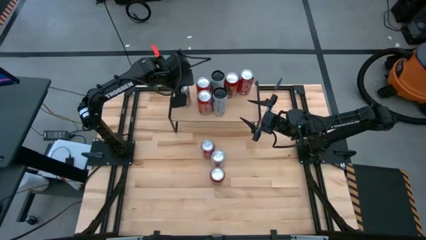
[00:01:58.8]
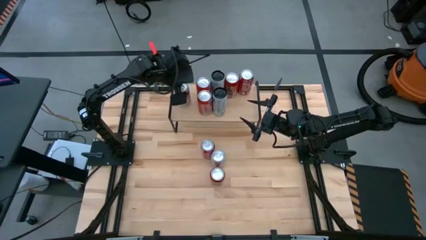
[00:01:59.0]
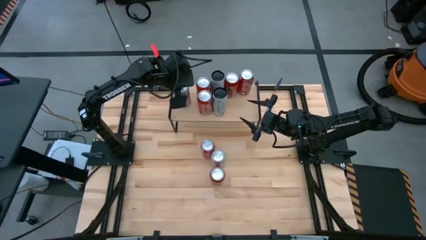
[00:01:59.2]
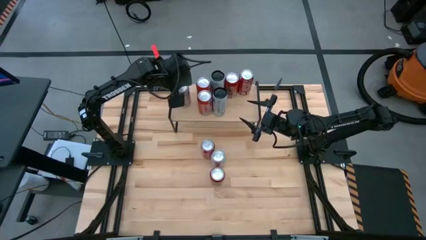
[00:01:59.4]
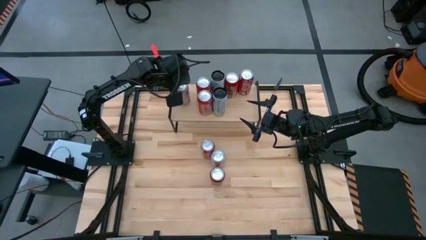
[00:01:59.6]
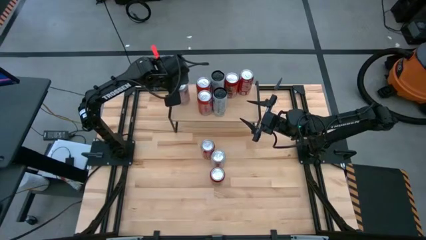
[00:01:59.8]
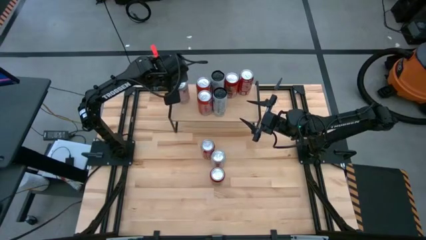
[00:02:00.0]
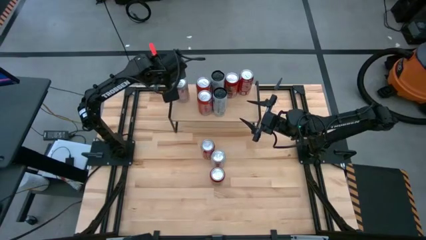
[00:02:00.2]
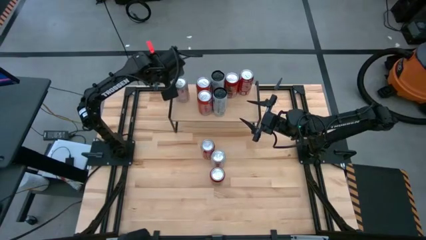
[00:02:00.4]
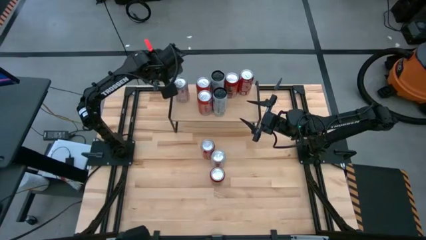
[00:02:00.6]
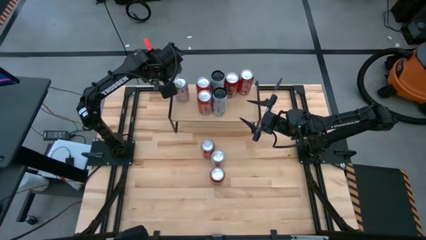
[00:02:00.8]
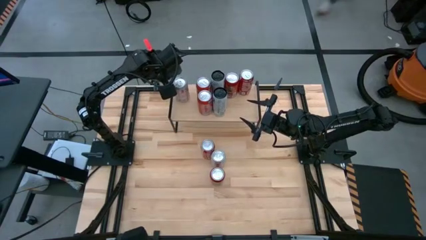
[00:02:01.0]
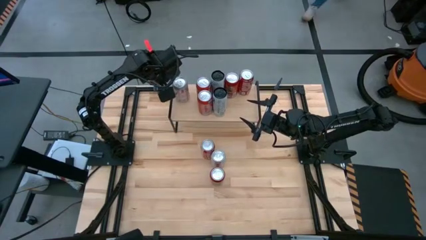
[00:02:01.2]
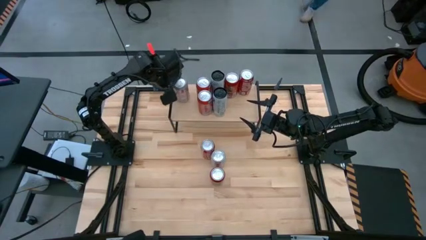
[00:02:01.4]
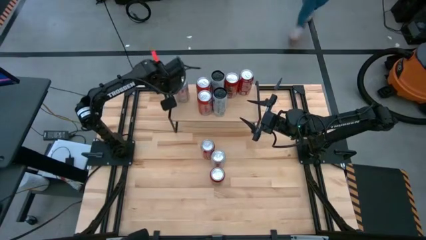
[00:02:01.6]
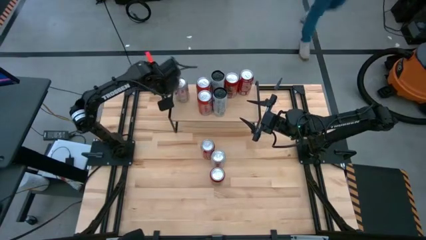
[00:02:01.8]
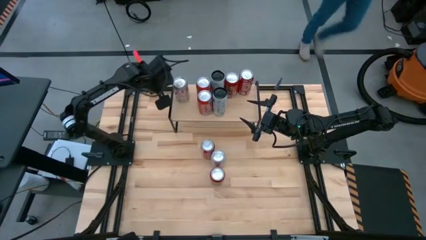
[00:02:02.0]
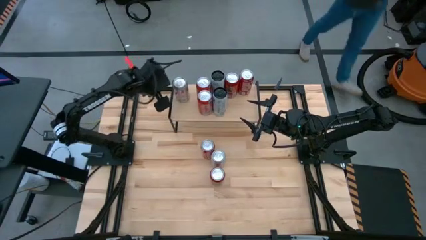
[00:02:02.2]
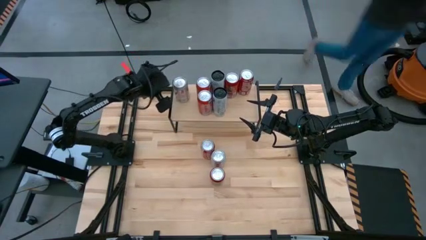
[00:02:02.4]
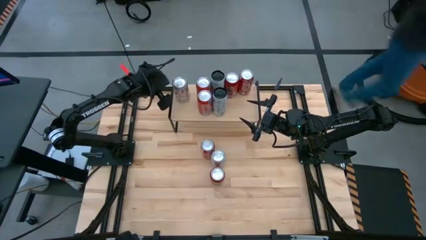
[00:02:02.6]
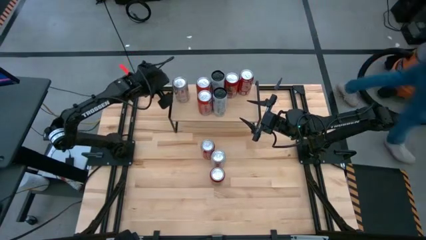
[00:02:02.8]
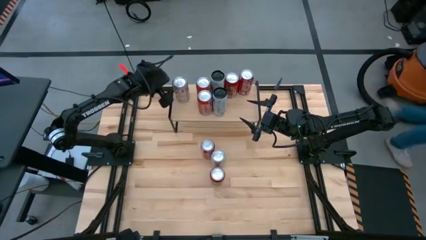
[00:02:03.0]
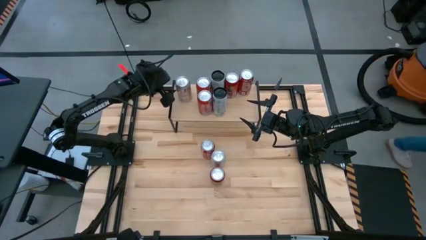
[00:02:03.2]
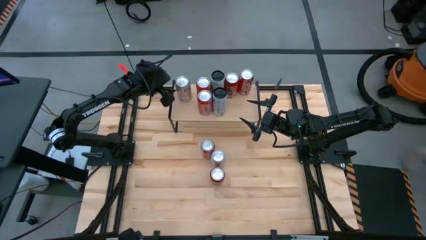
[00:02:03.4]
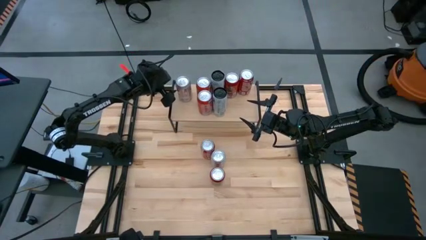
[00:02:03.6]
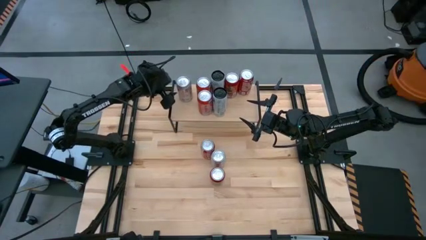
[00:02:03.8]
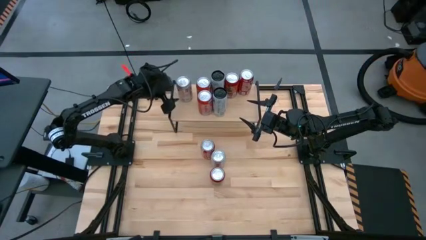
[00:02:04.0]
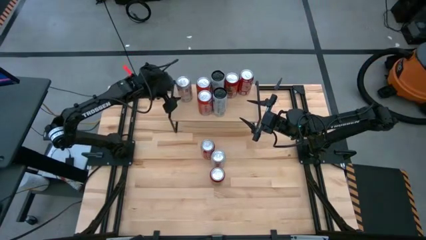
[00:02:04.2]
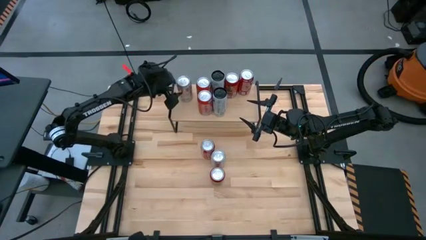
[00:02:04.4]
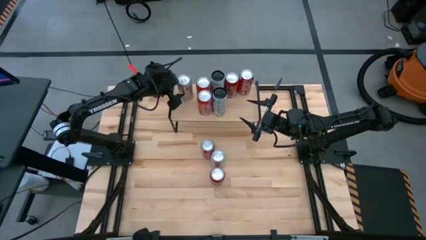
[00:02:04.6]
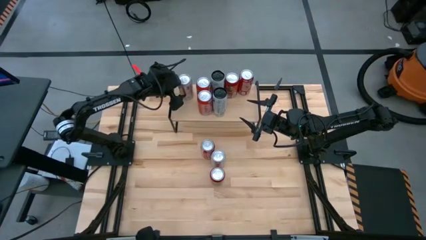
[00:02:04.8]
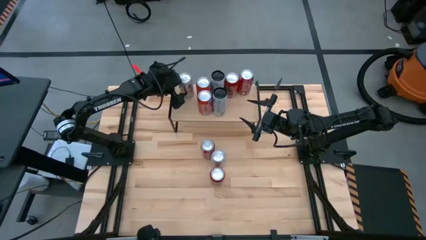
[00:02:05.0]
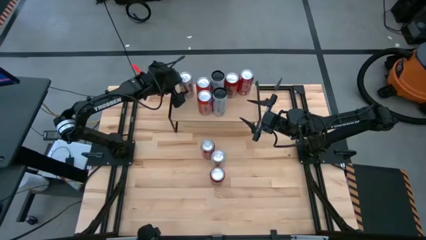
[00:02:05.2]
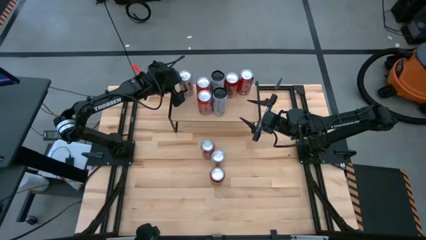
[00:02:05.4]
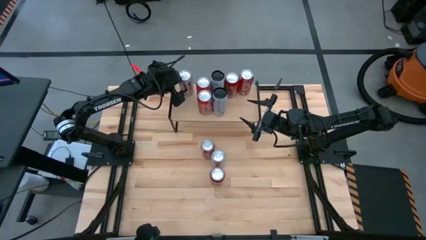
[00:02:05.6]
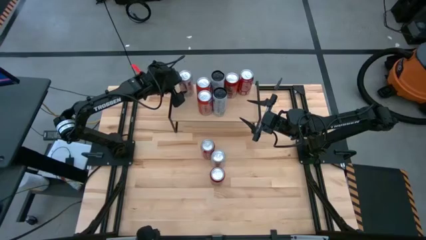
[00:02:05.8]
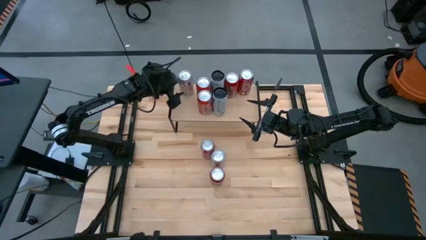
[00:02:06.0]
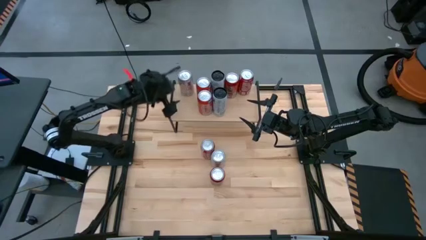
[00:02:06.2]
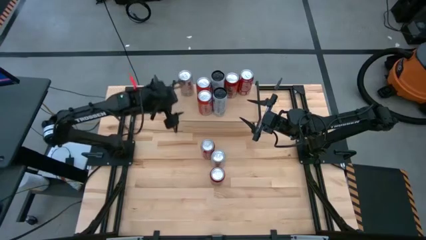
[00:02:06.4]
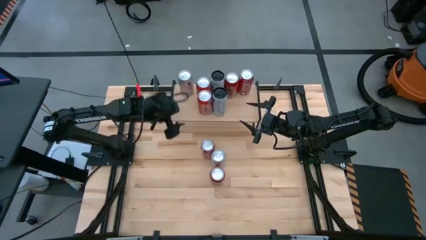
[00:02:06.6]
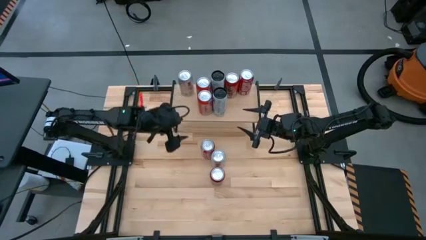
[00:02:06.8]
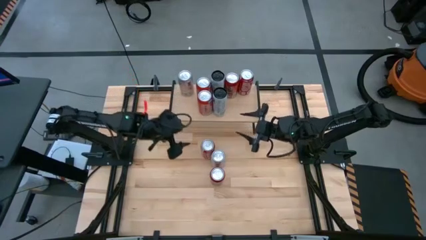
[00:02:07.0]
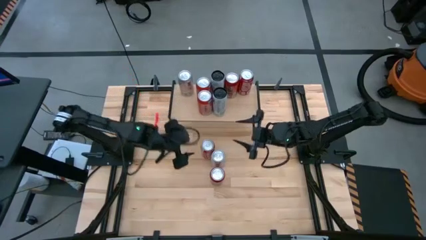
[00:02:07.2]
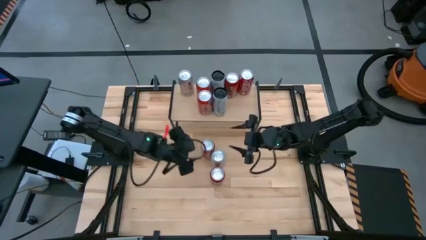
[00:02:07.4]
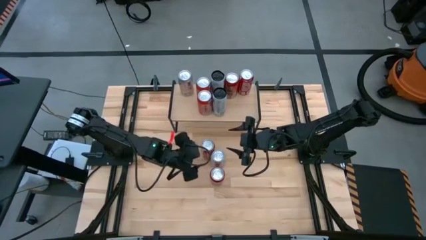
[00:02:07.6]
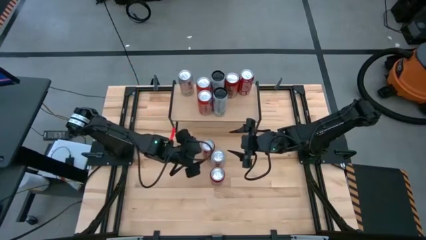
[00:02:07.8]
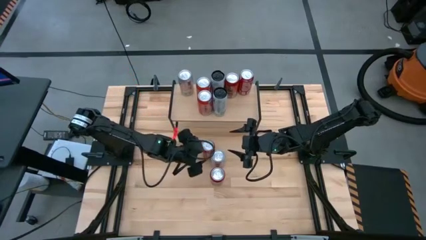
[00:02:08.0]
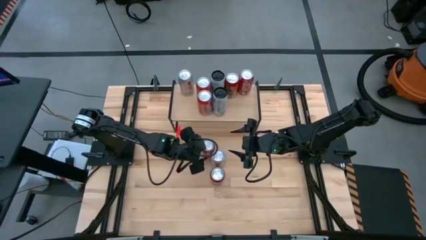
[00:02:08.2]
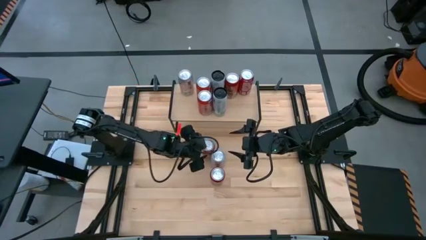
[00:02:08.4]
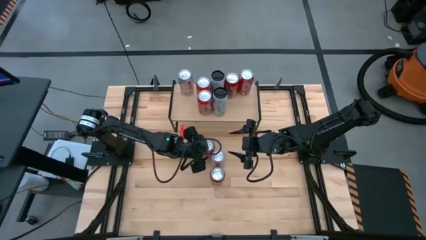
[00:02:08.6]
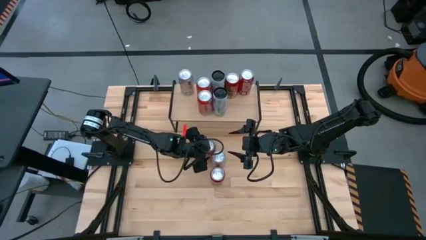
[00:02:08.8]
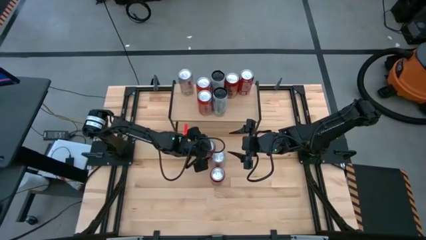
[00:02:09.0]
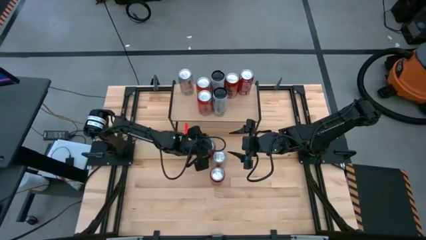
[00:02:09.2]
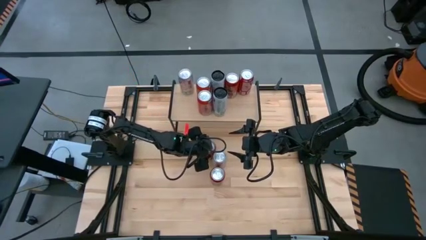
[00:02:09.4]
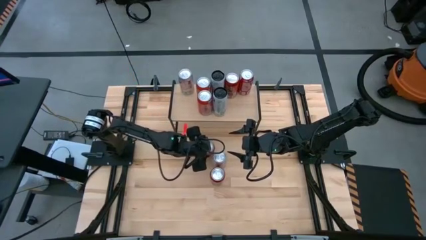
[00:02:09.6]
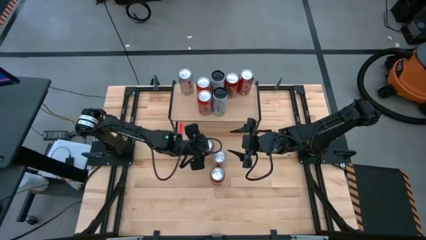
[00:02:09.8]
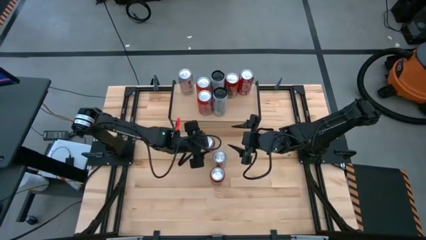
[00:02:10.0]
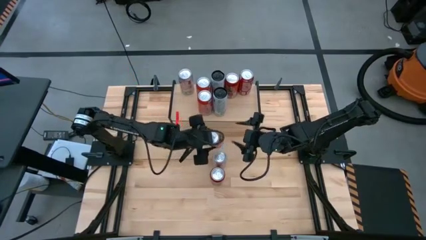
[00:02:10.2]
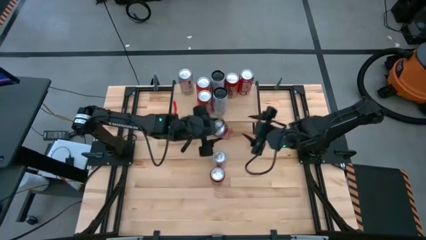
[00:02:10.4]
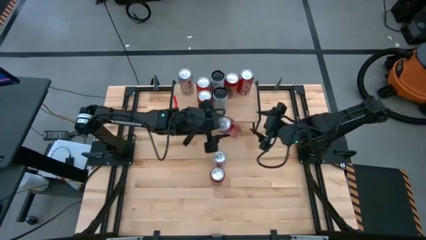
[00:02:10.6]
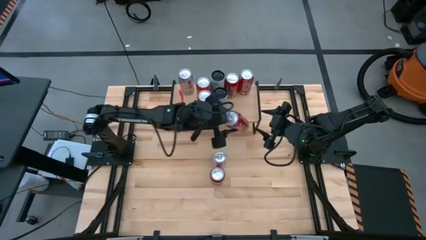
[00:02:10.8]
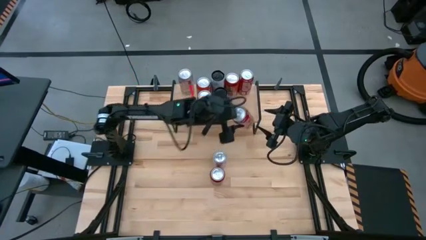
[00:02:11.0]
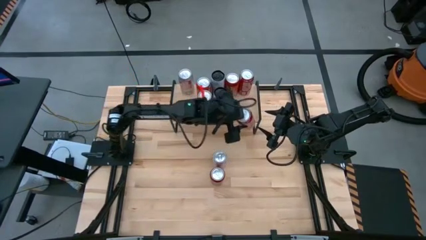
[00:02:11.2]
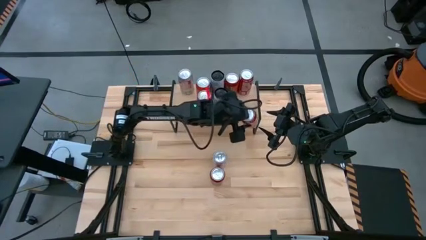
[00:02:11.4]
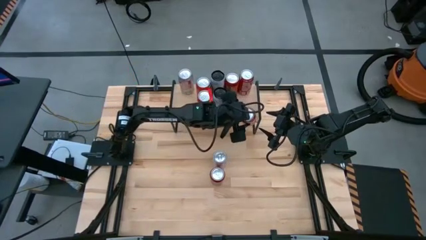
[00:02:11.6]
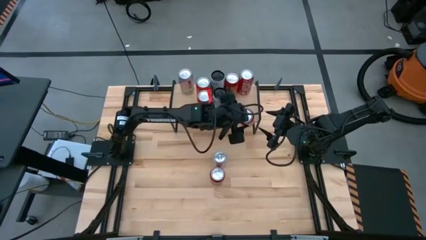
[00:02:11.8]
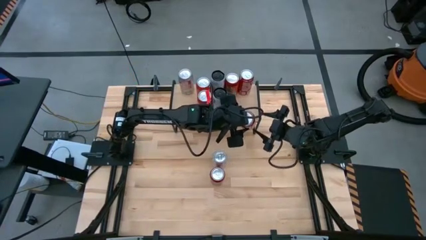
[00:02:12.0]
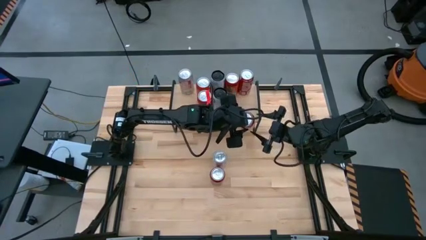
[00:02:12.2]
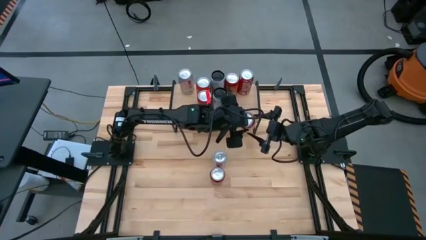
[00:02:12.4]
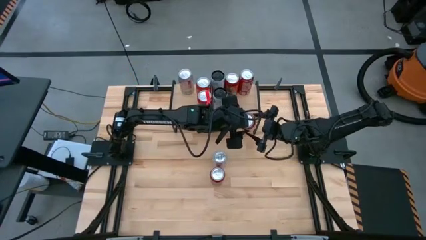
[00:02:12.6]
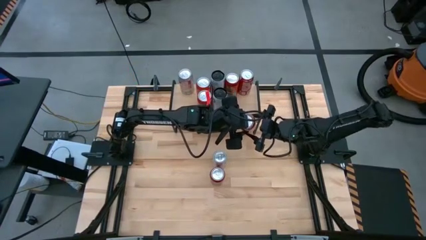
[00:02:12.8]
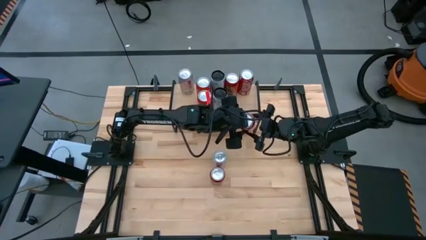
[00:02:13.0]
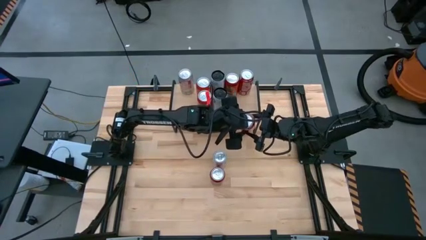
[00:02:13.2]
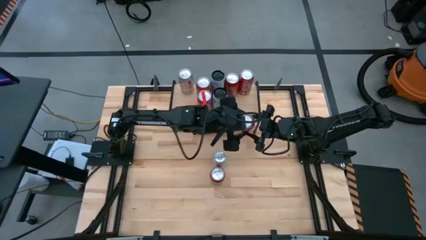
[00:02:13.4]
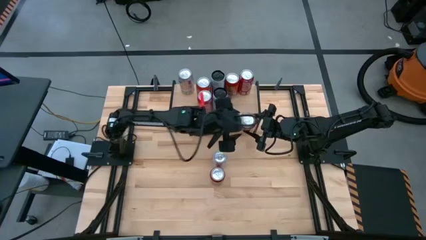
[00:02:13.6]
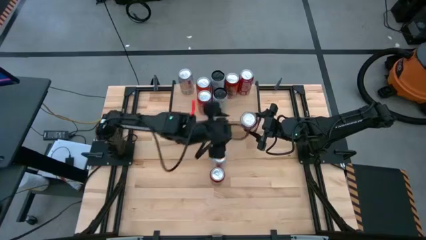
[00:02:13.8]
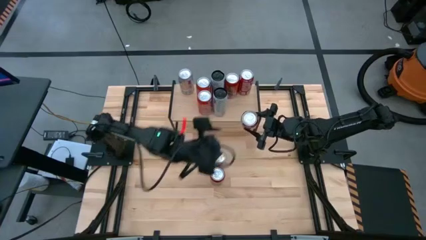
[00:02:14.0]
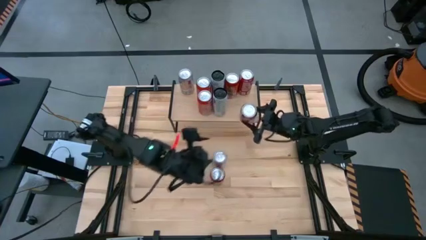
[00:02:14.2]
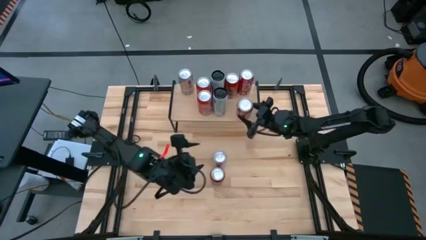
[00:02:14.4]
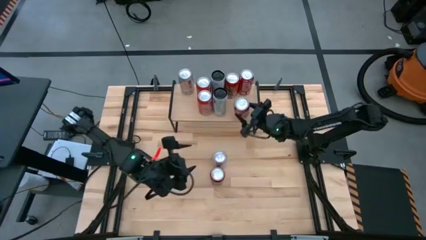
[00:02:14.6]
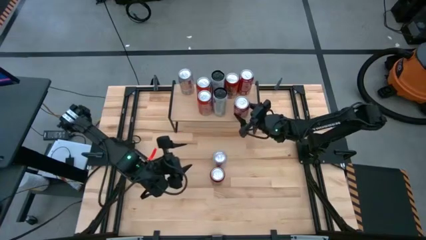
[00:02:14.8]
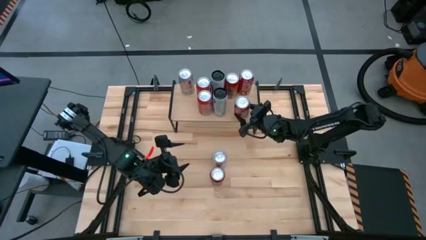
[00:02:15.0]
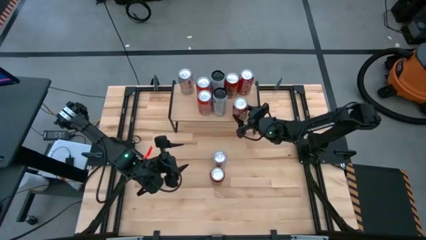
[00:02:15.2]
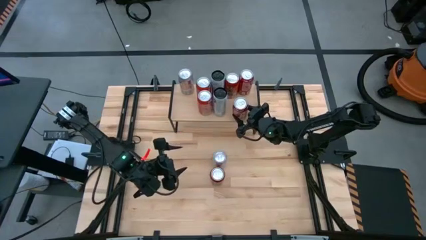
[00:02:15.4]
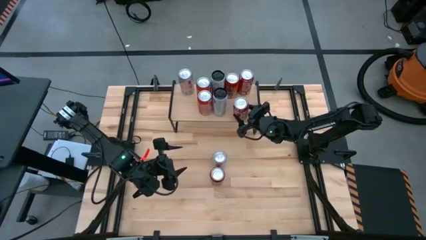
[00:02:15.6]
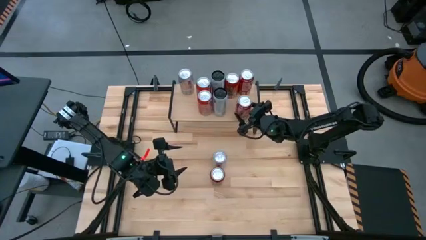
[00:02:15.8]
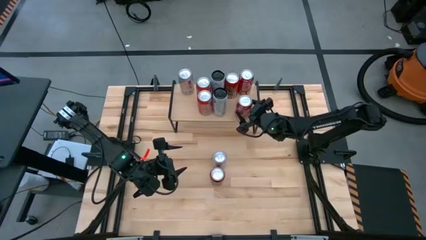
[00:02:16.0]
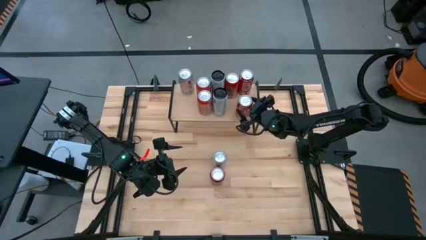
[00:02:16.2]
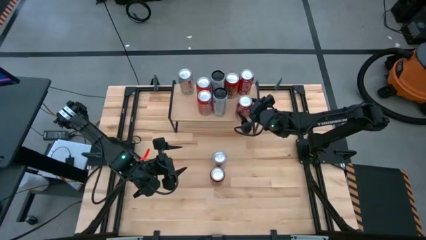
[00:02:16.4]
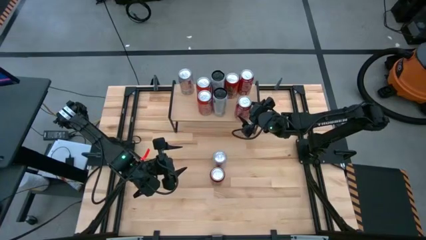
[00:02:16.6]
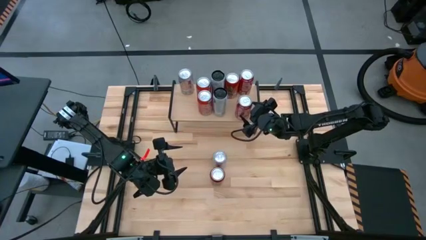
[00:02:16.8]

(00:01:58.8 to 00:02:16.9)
Task: Place canned beverage on shelf
Put the red soda can on the shelf aligned with the other red soda can
